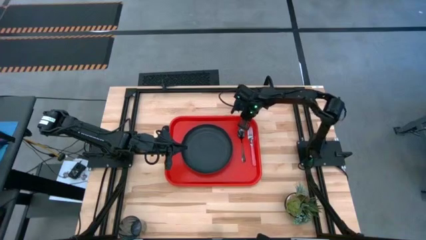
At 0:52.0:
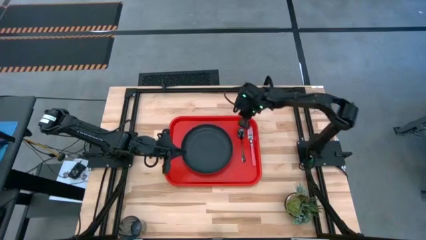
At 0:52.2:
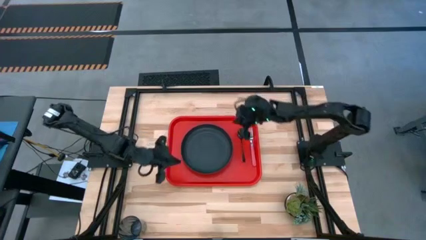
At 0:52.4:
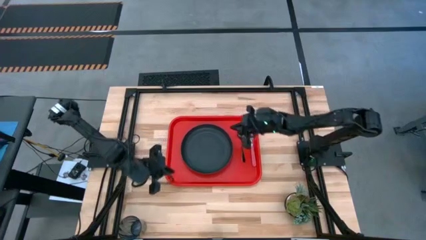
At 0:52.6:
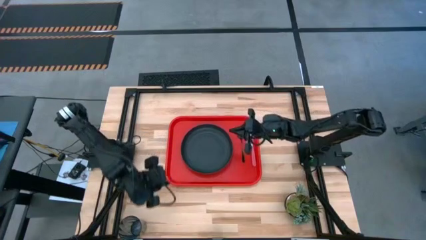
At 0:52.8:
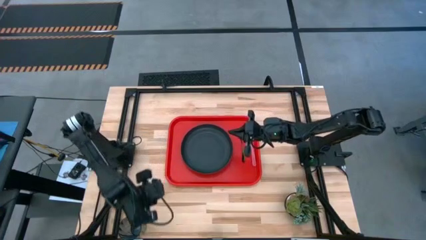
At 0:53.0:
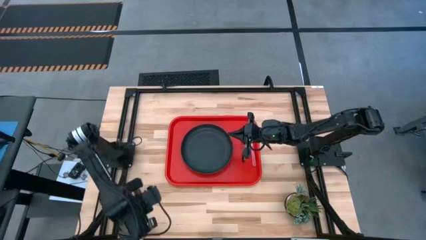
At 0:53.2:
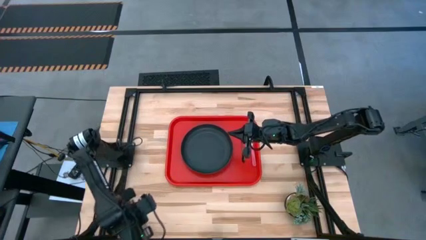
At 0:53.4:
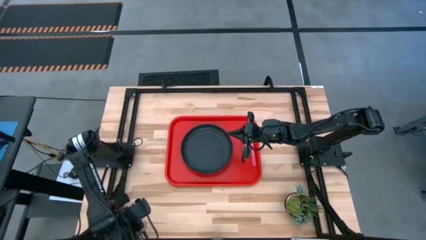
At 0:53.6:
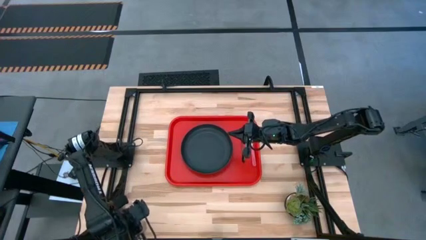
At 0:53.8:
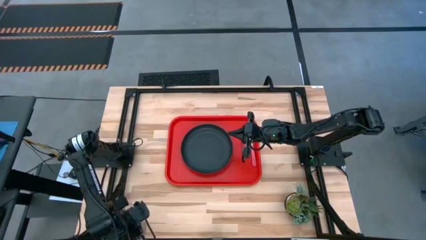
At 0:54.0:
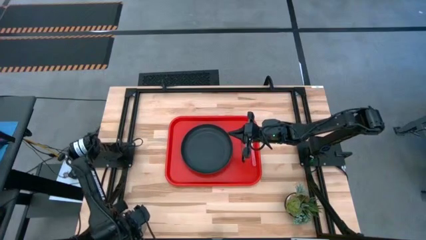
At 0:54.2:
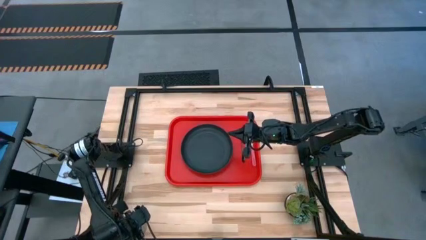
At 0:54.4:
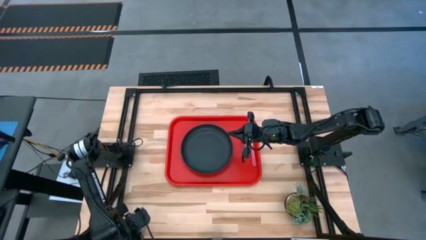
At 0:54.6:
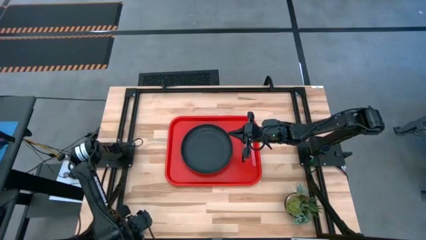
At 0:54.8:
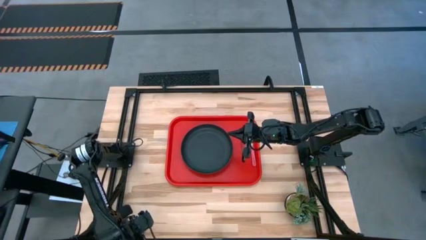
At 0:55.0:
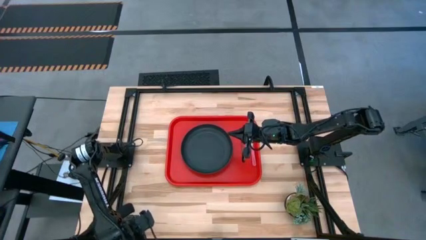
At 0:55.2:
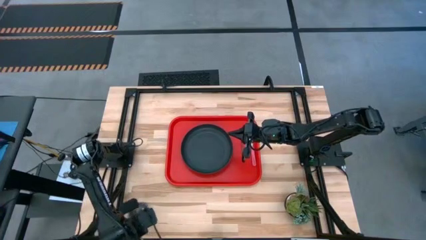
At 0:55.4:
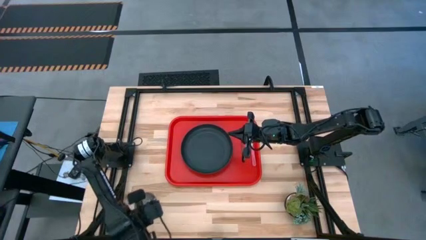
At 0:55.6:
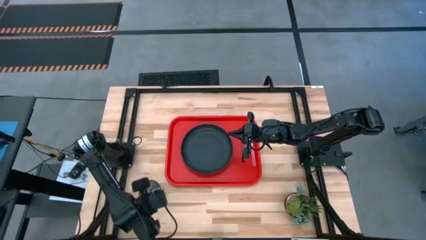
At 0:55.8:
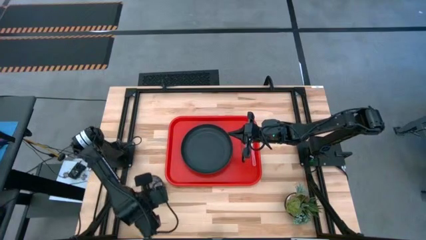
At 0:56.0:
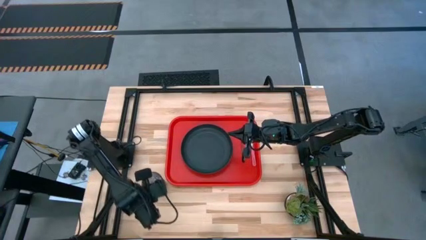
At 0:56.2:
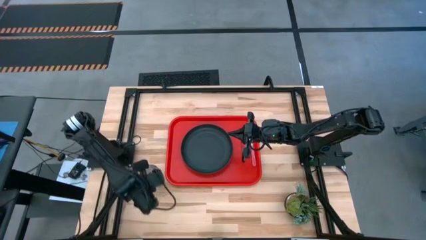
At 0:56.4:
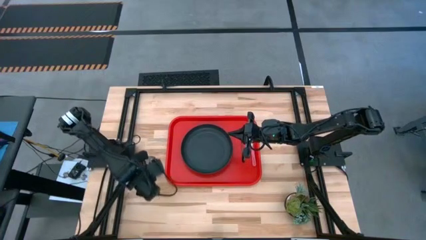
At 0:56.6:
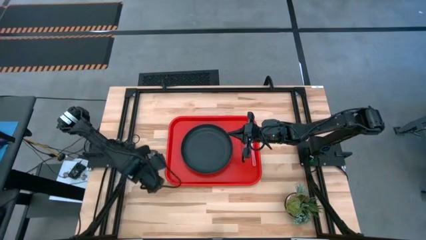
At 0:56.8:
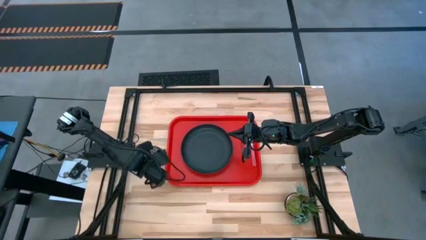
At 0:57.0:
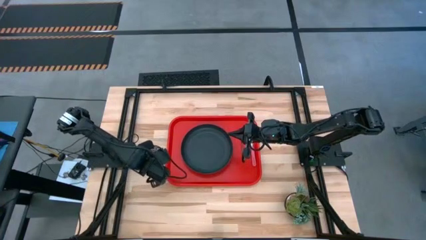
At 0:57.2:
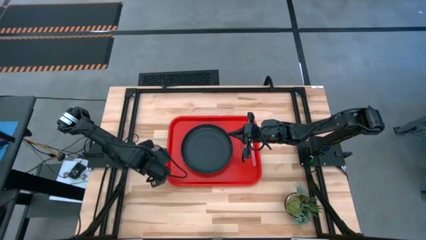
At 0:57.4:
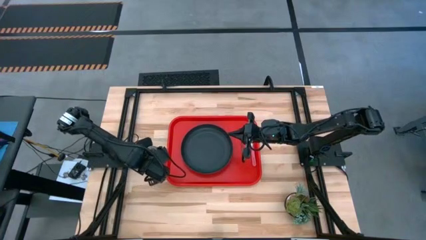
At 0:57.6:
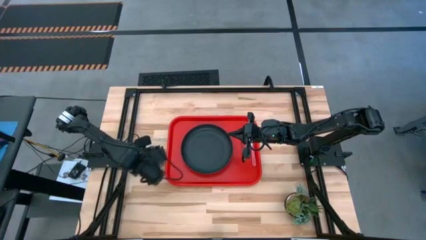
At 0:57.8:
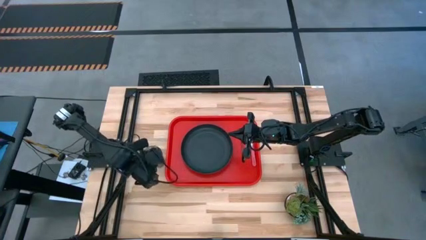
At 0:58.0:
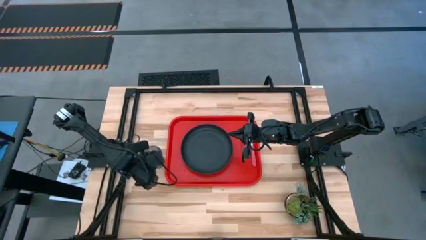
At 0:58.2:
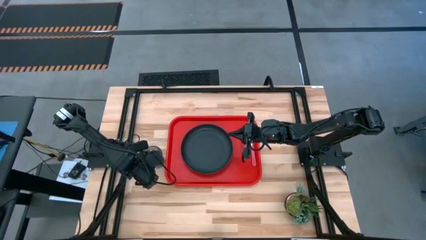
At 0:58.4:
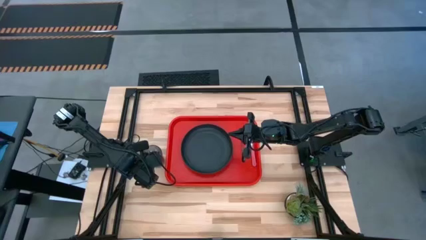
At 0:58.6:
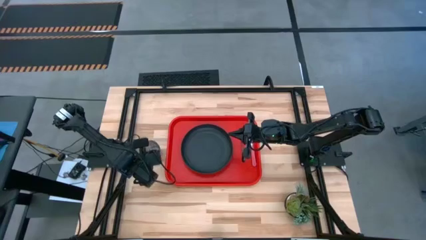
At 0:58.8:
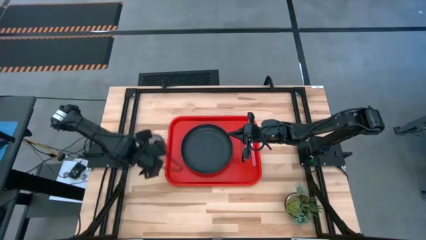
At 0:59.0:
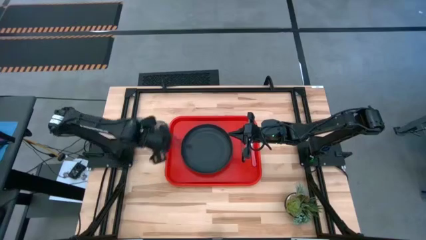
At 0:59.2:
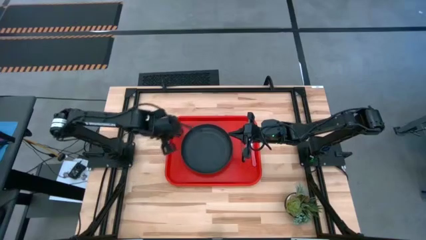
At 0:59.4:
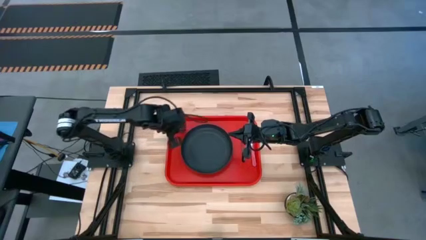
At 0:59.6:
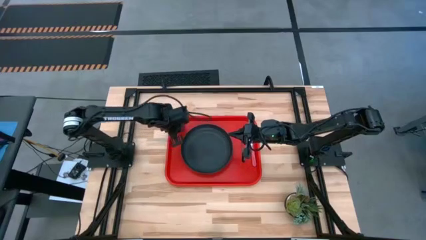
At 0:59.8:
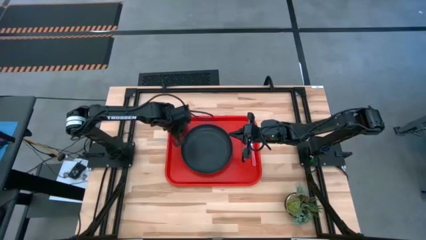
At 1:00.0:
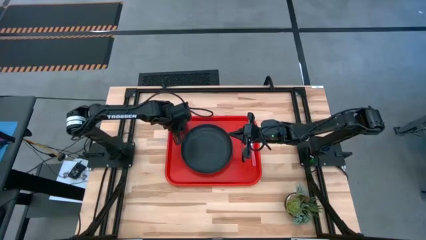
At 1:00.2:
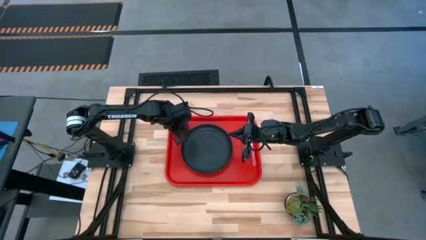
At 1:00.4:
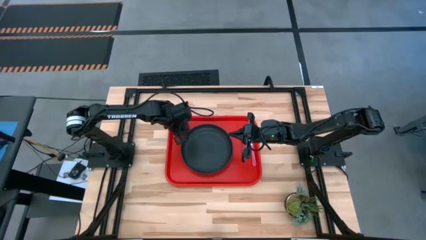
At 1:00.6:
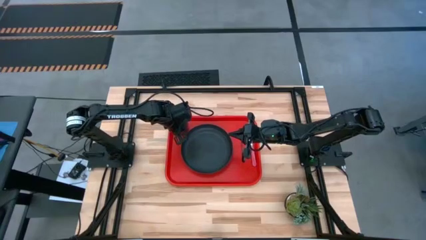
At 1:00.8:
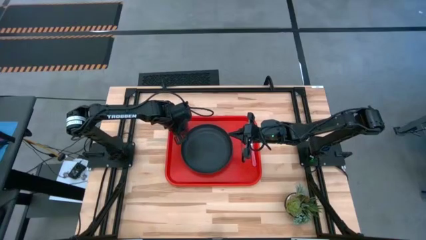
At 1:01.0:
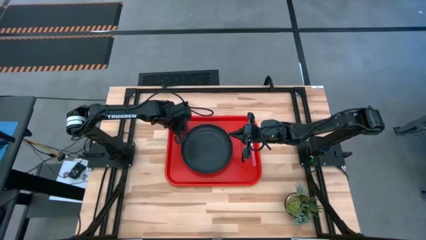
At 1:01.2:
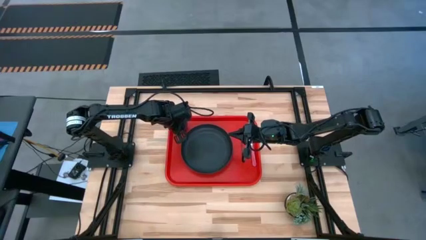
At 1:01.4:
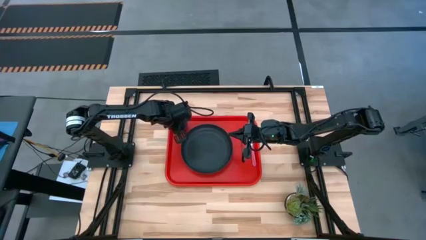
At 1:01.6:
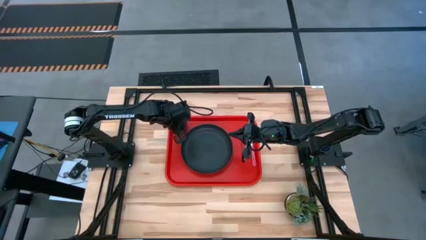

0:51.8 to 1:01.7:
Task: Pick and place plate/cup/fork/spoon on tray
Put the blue glass on the red tray to the top left of the black plate

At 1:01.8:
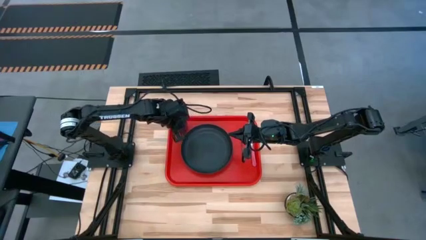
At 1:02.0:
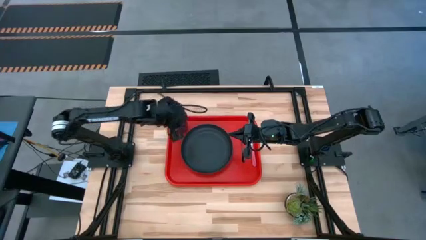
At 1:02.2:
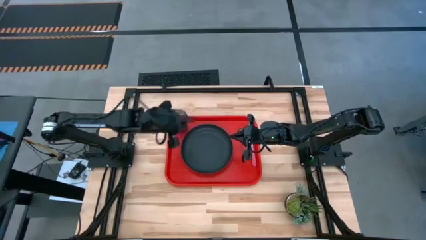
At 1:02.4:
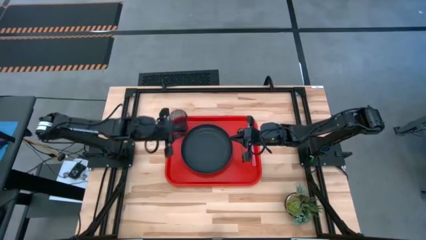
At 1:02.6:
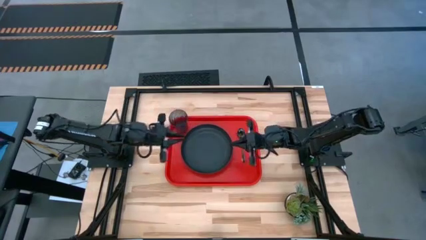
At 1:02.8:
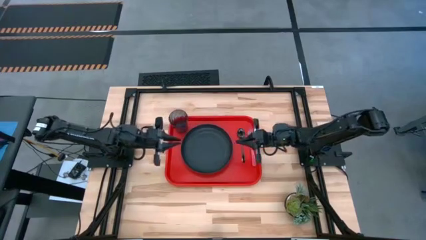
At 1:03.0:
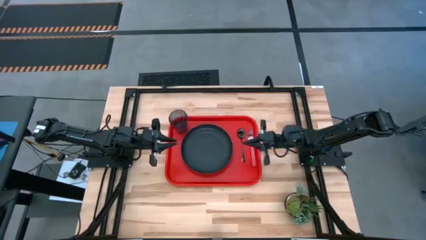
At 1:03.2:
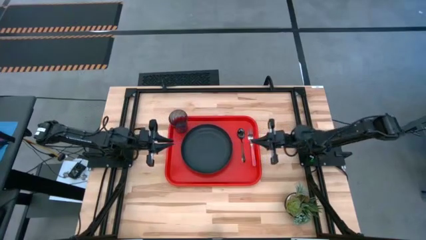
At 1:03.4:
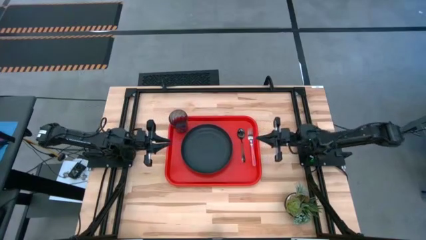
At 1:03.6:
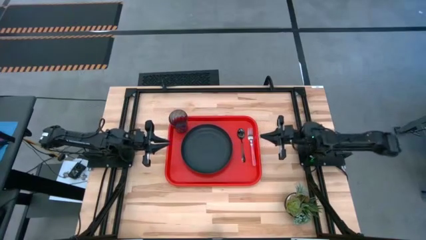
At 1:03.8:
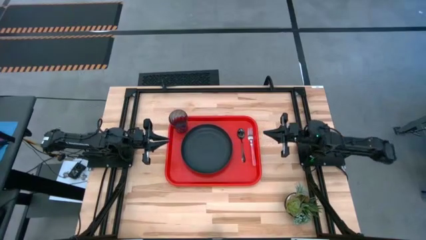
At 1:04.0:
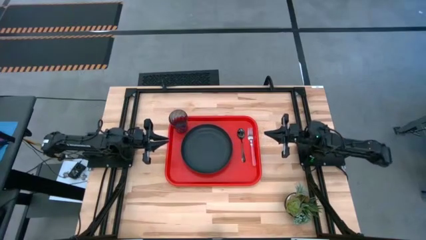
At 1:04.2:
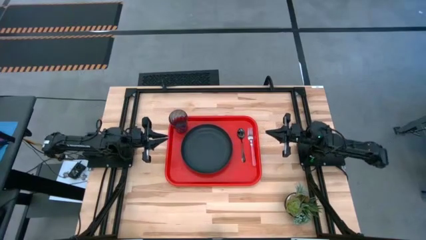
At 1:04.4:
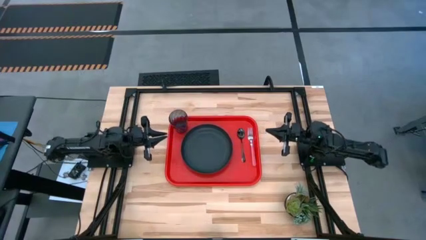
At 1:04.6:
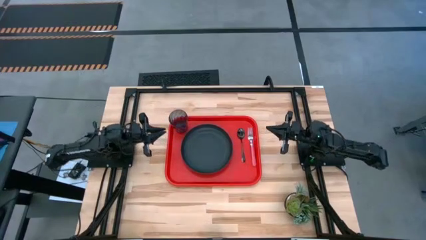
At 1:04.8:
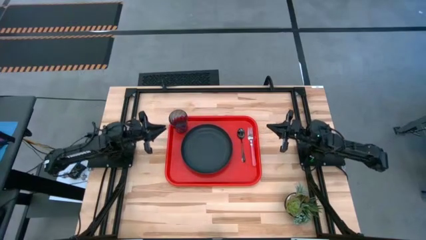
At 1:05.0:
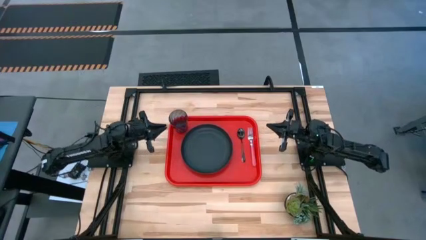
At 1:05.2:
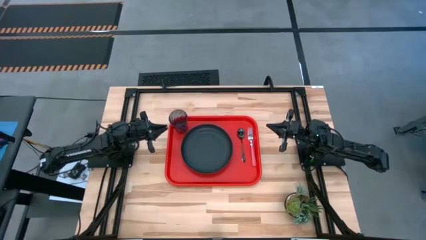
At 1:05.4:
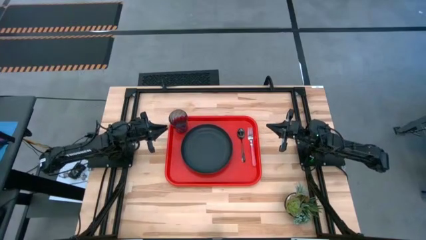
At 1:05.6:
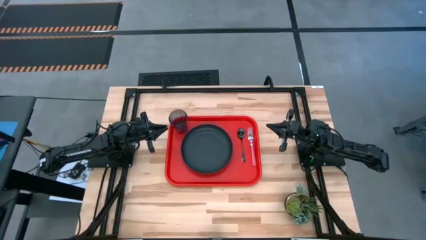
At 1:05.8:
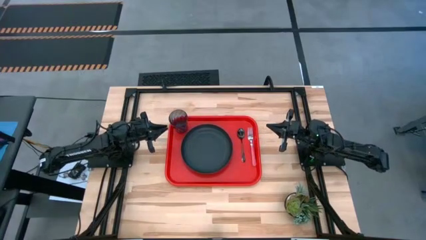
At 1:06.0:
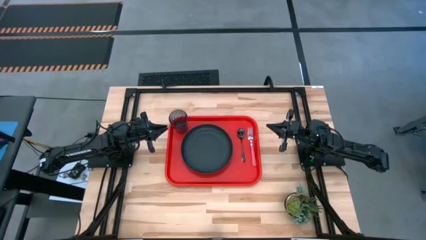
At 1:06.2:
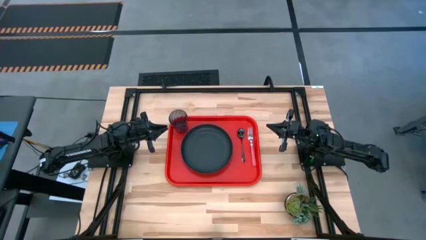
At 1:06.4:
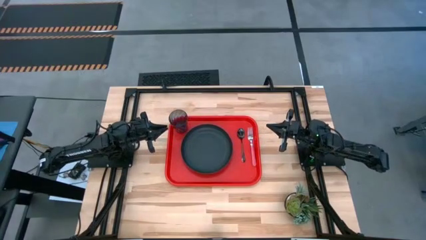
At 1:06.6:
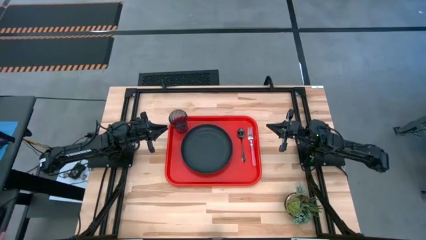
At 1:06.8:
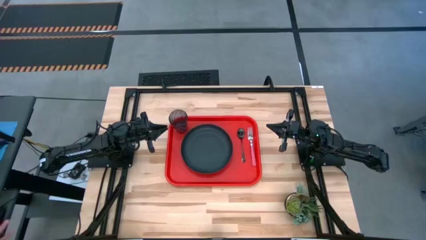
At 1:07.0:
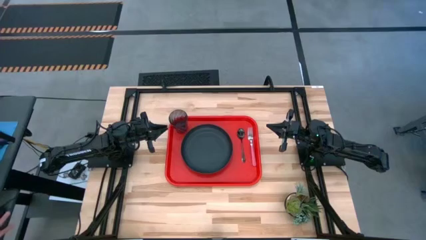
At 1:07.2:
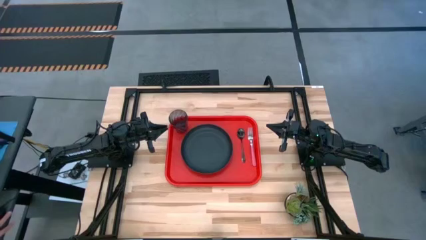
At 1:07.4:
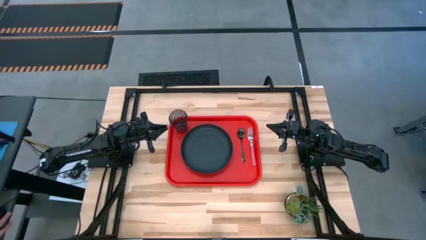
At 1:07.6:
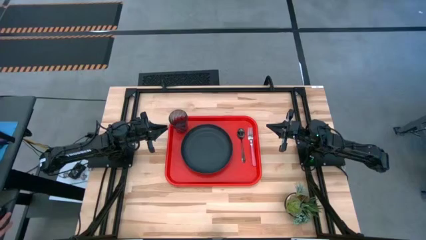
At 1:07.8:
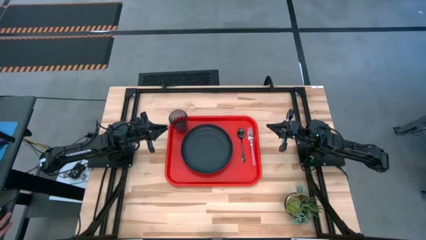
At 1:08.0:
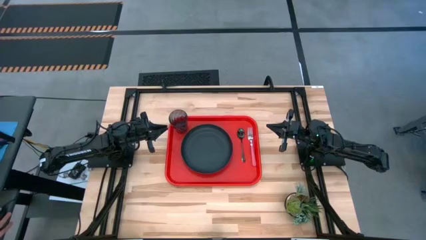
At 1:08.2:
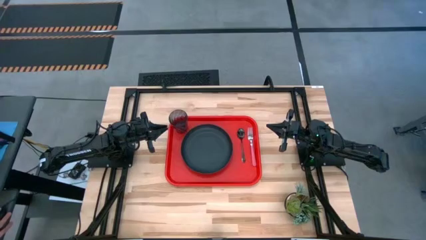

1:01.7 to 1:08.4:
Return to Home Position
